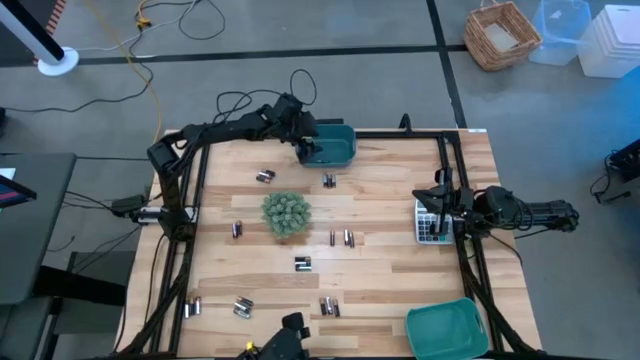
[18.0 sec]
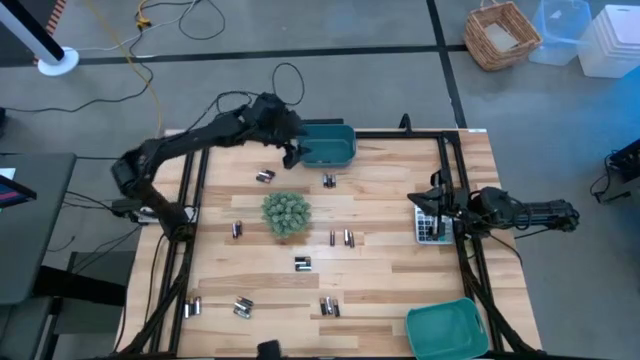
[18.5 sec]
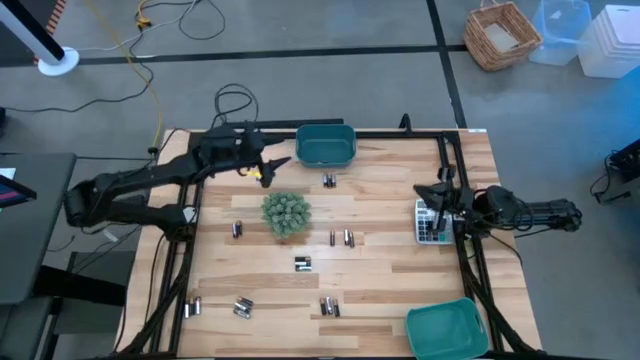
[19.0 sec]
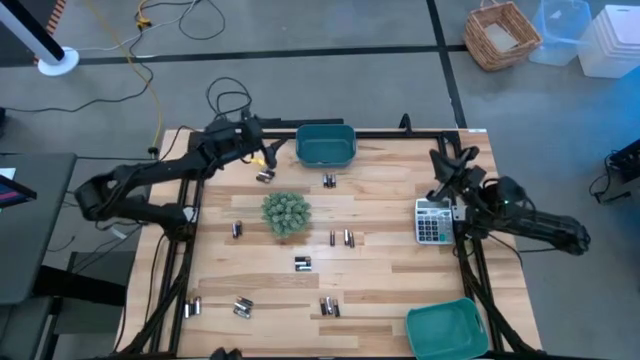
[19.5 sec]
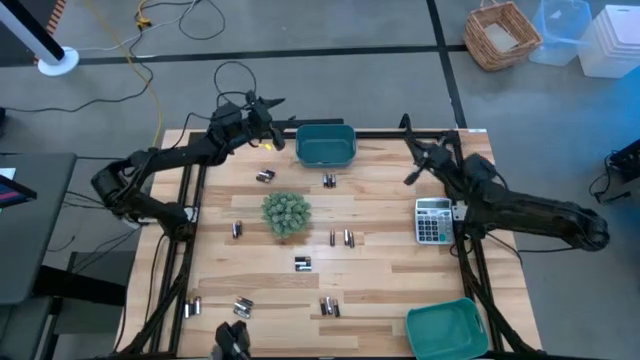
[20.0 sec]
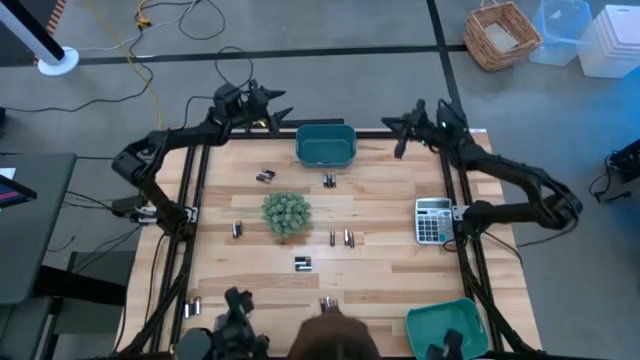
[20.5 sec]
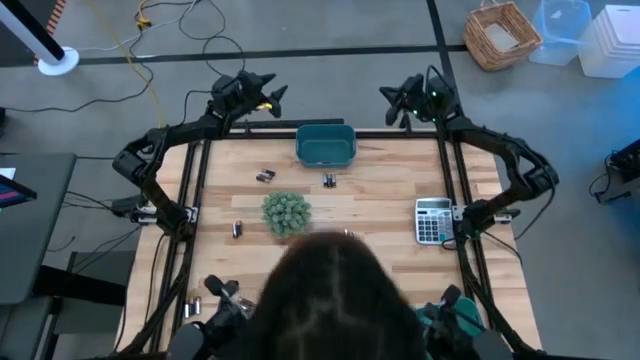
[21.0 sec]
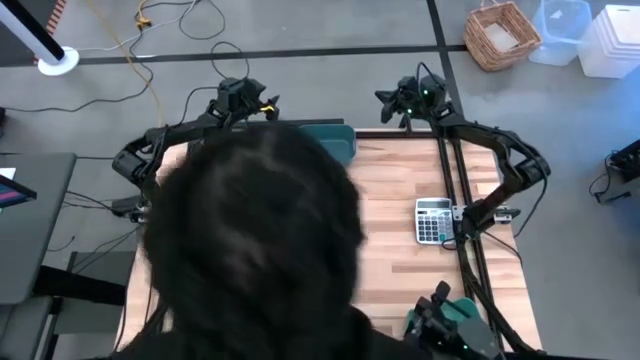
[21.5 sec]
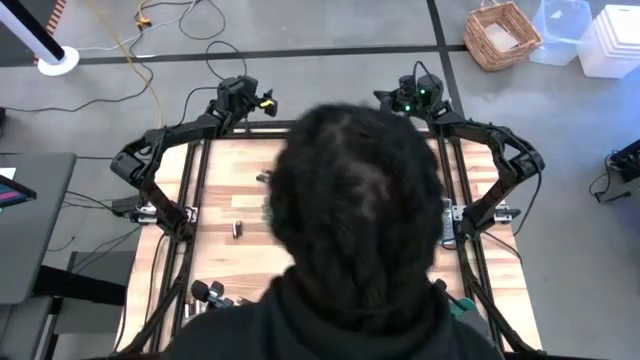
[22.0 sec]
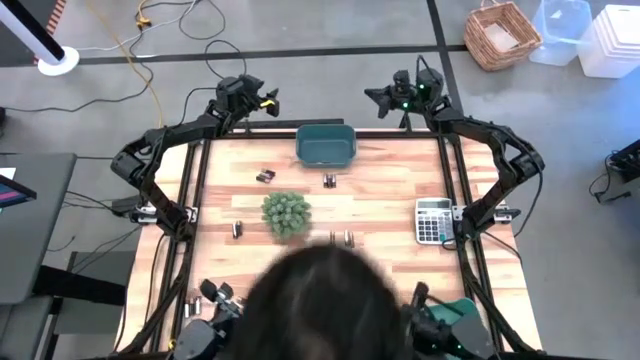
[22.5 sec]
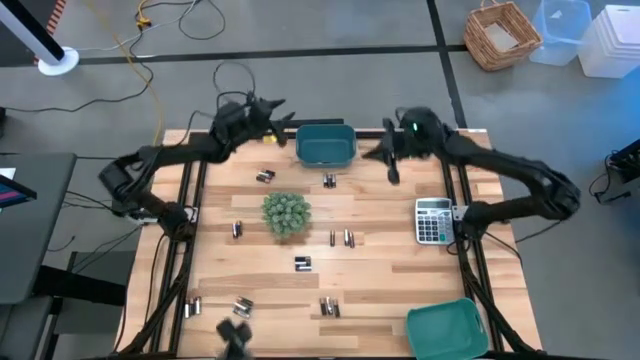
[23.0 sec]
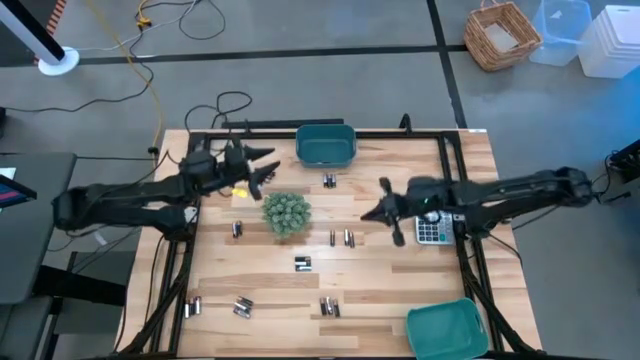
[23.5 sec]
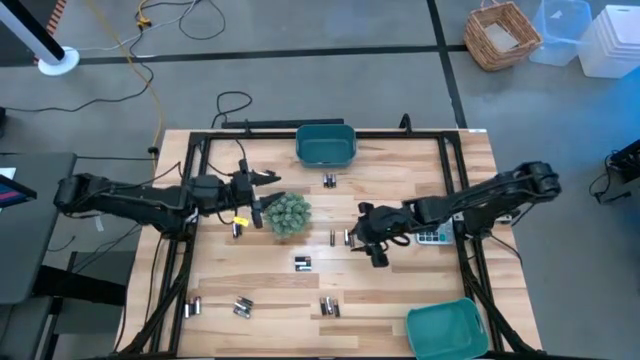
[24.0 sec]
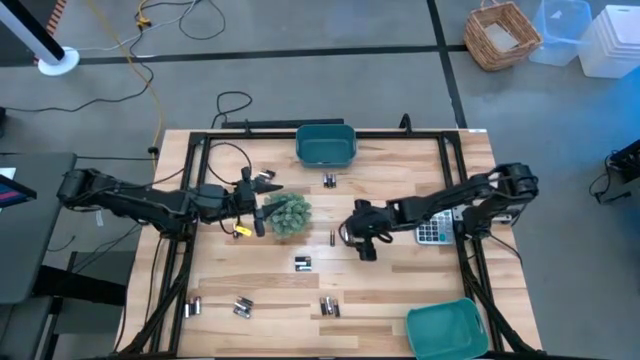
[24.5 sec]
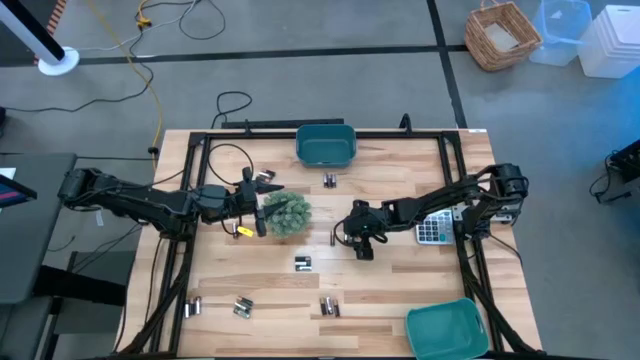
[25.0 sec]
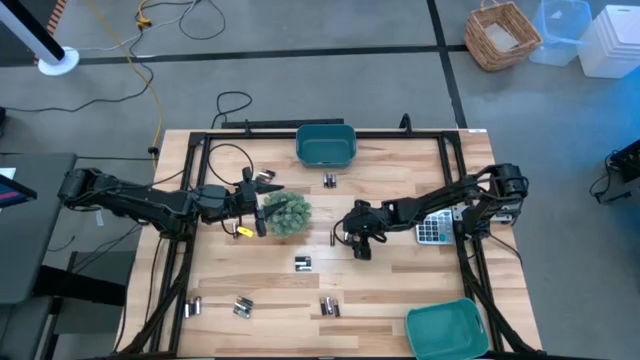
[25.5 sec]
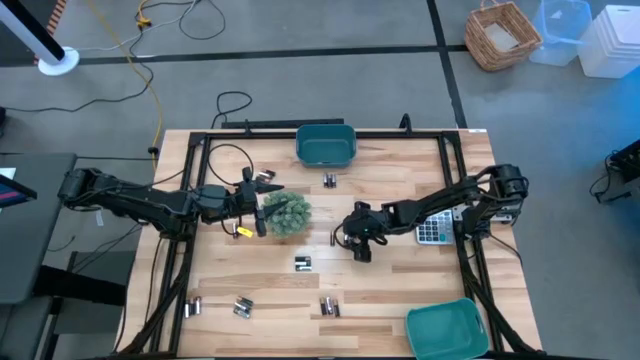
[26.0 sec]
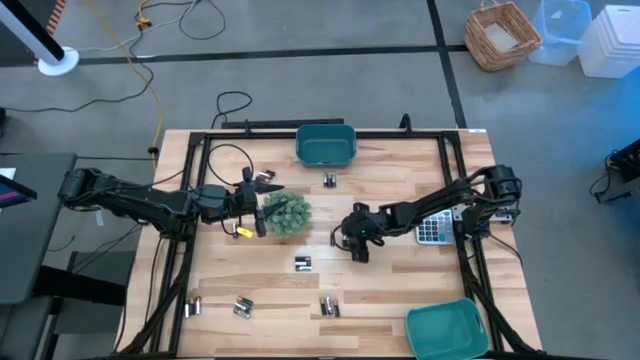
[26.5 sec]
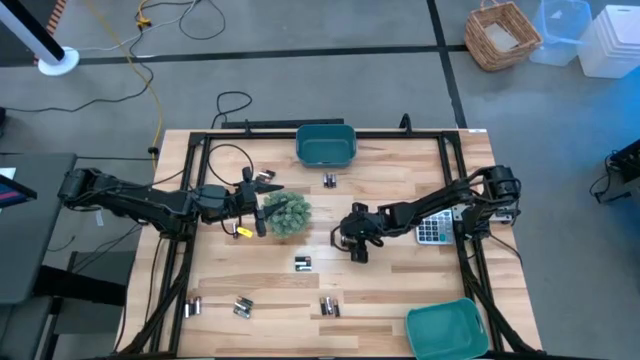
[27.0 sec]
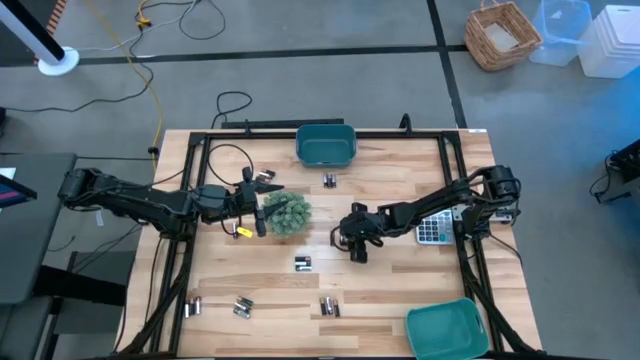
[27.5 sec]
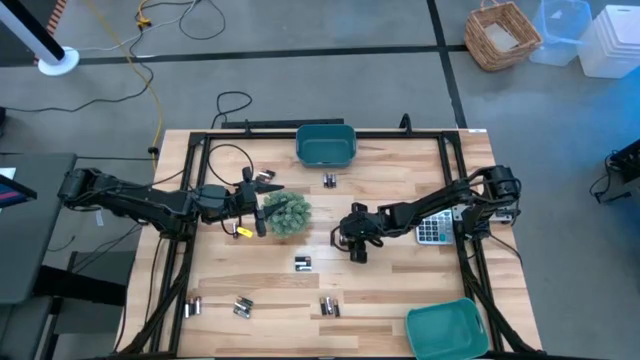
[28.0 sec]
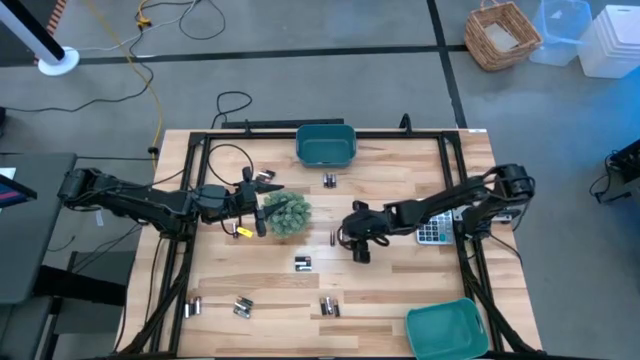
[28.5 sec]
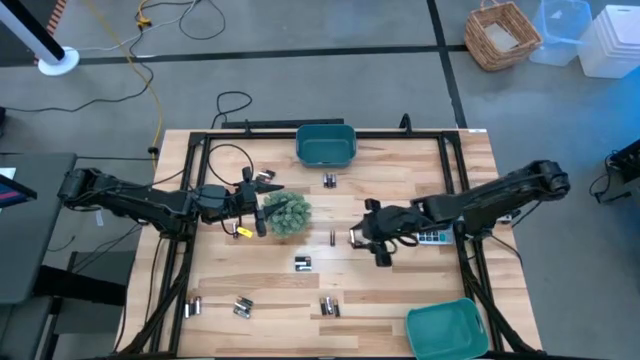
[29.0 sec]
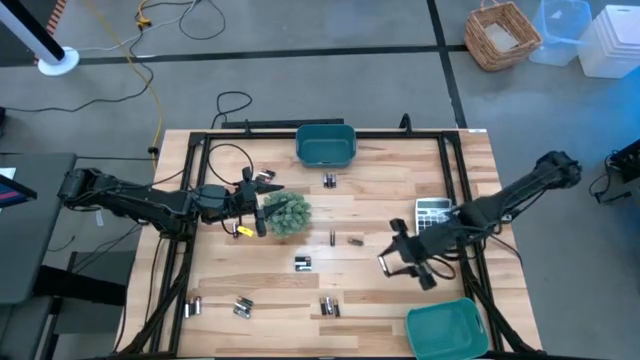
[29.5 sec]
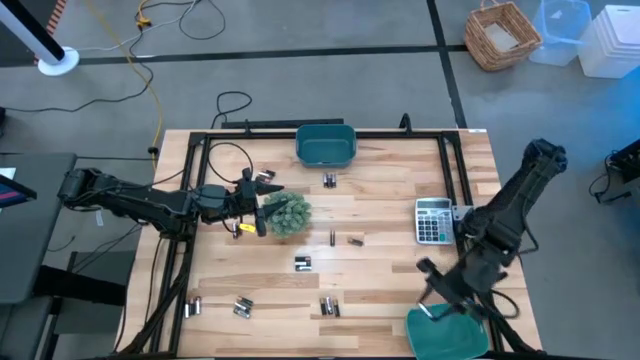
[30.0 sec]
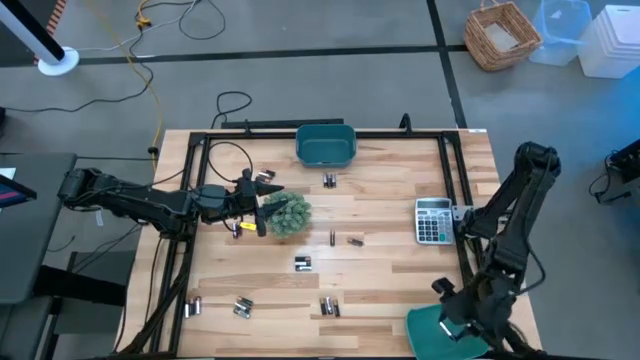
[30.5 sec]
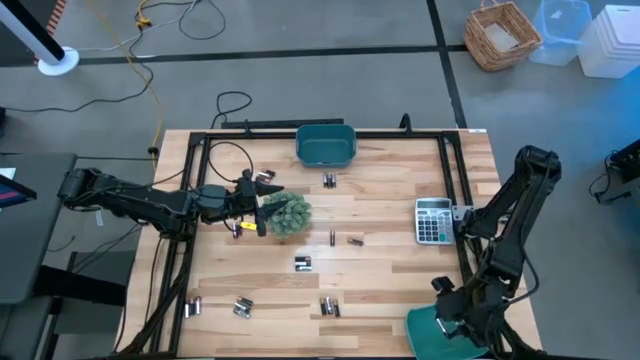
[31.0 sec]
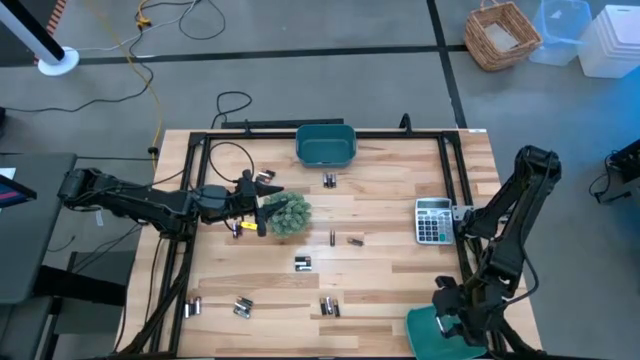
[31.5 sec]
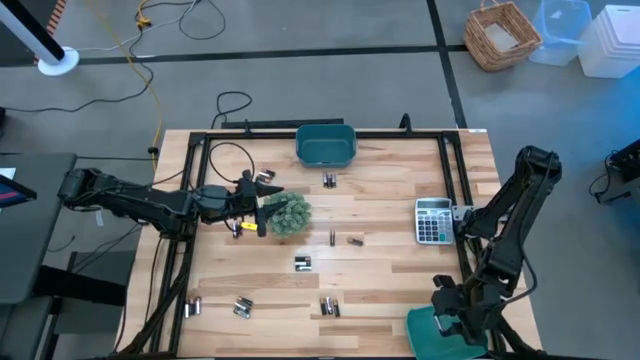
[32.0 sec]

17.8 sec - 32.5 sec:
Task: Sort batteries
Put the silver battery into the green bin

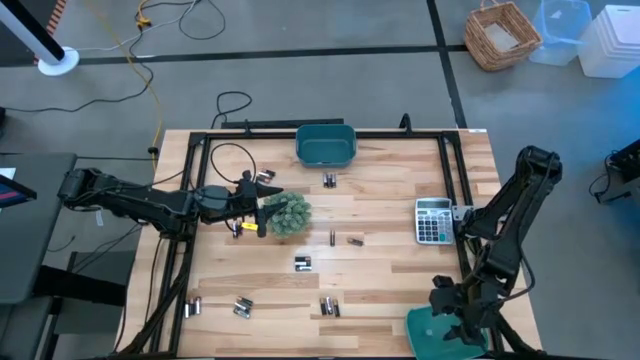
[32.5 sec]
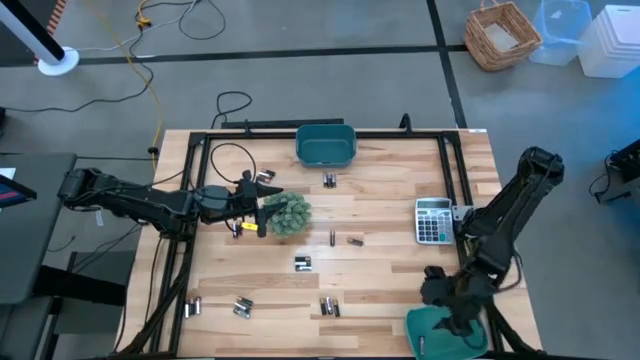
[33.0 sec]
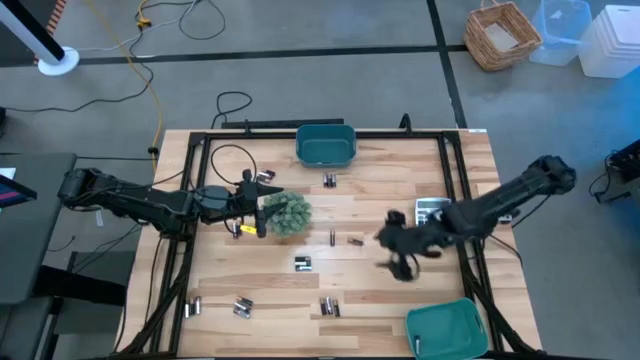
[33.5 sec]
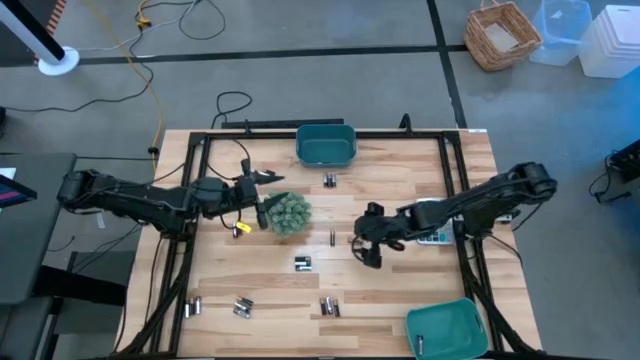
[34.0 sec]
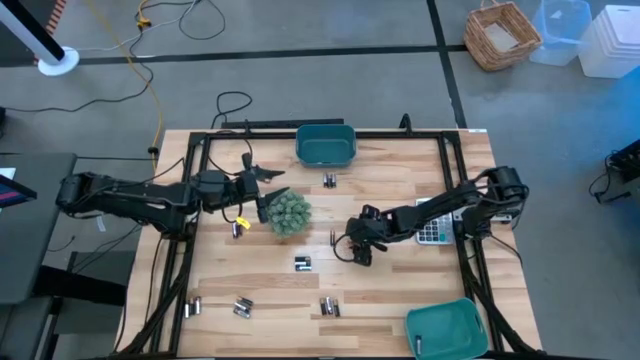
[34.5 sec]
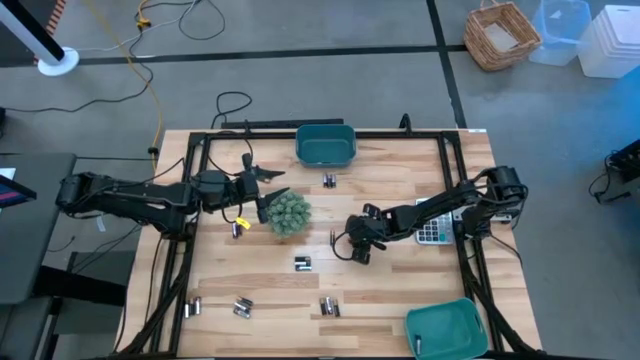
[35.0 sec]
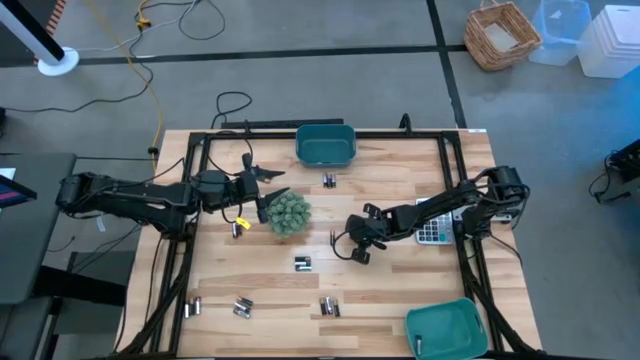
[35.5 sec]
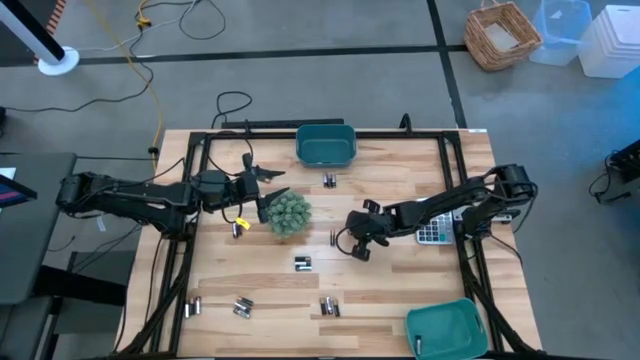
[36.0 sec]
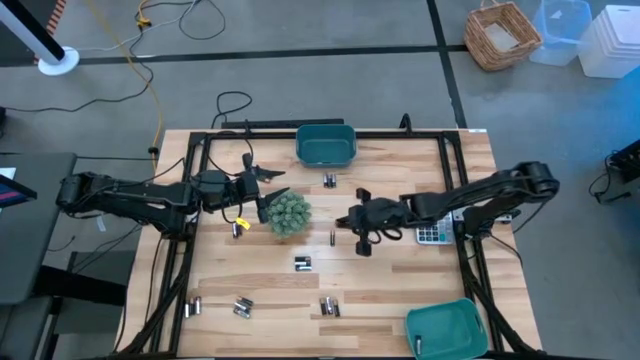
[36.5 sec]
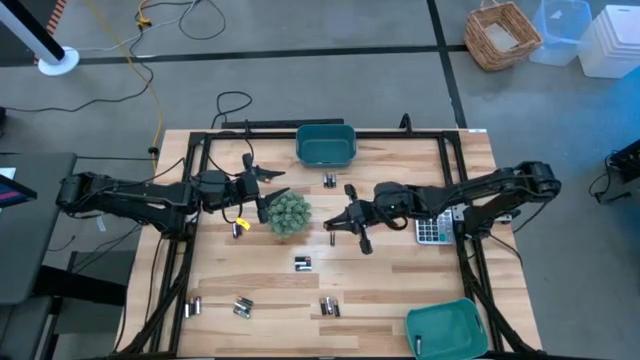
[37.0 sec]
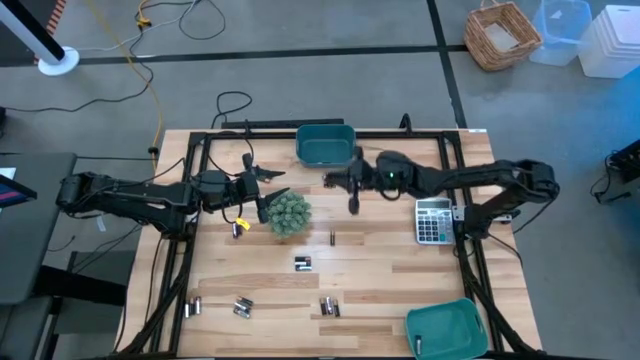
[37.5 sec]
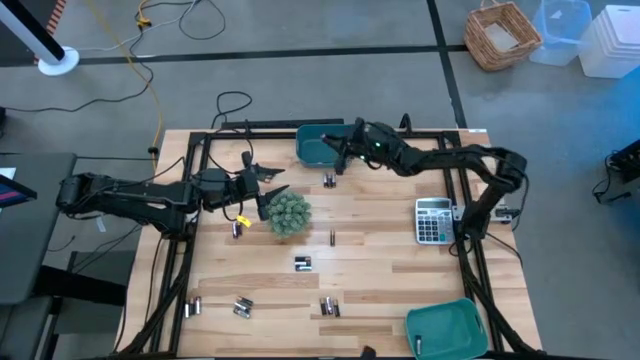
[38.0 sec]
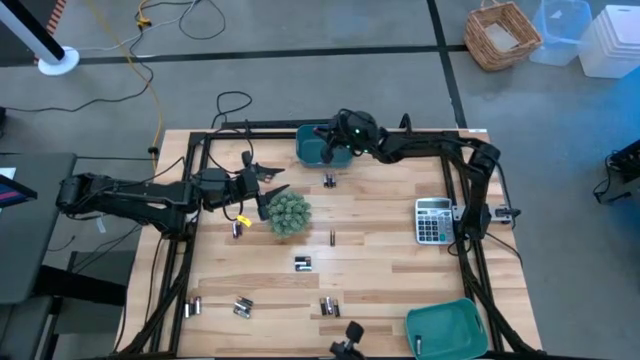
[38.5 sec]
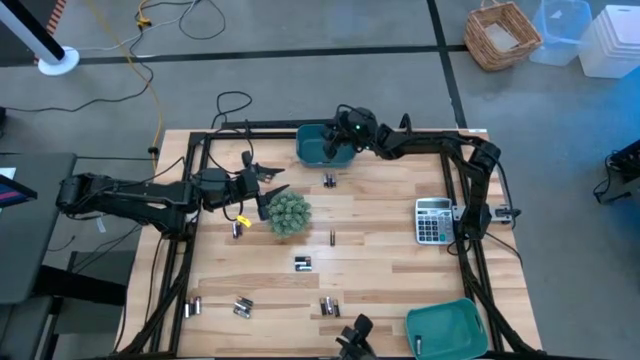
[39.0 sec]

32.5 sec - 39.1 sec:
Put the black battery into the blue bin
